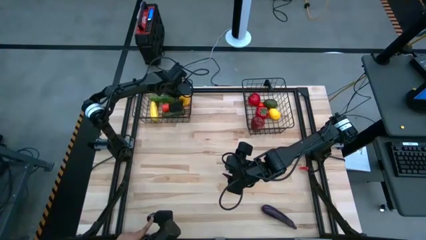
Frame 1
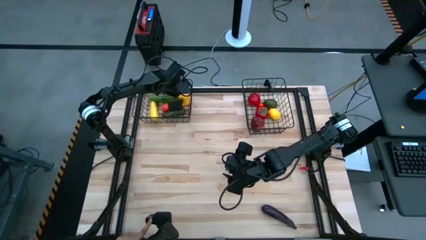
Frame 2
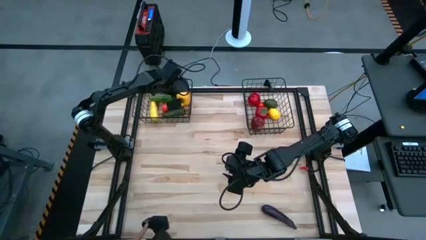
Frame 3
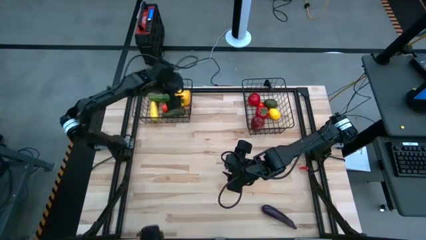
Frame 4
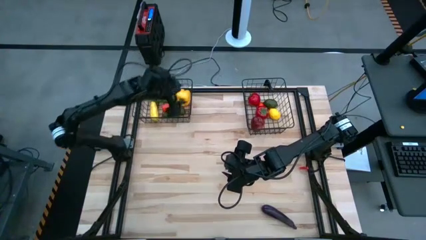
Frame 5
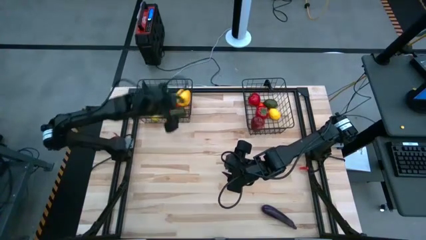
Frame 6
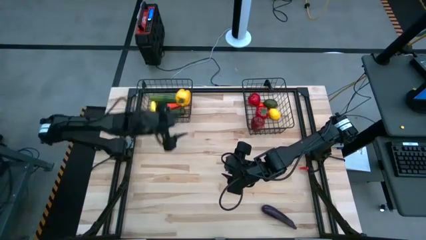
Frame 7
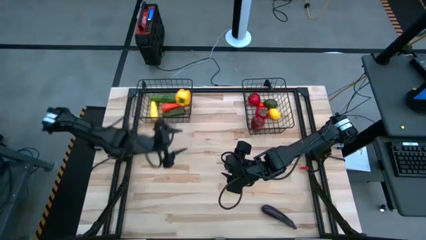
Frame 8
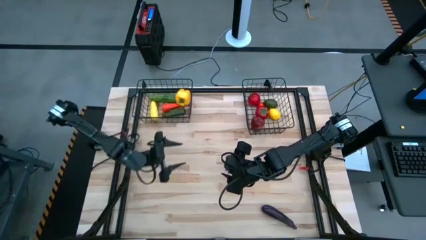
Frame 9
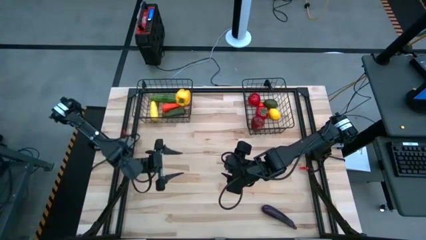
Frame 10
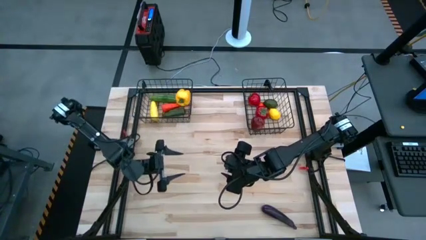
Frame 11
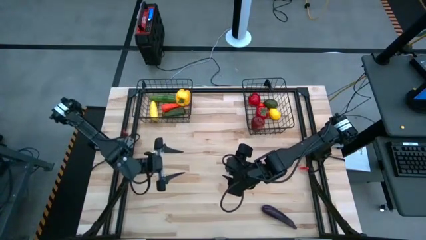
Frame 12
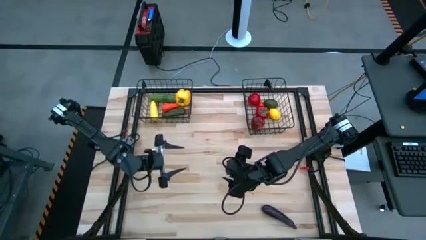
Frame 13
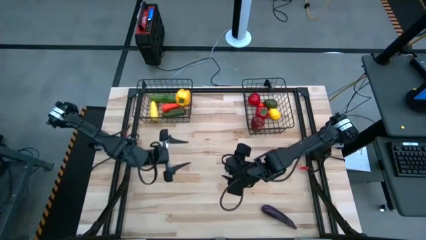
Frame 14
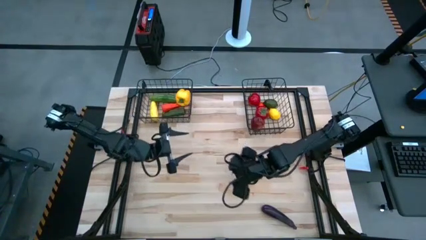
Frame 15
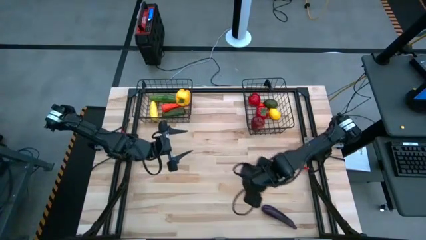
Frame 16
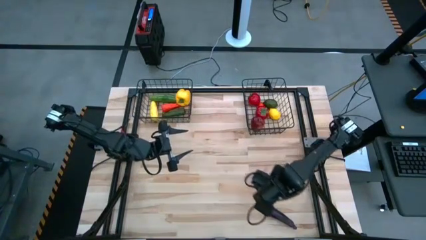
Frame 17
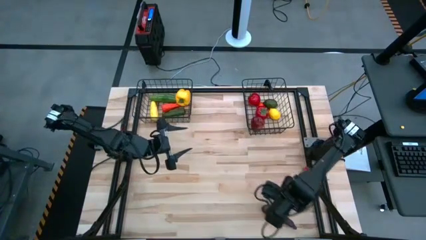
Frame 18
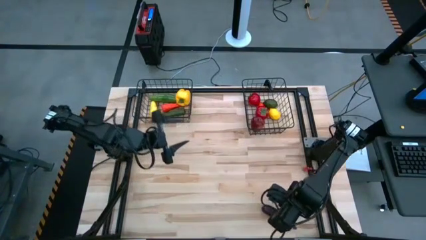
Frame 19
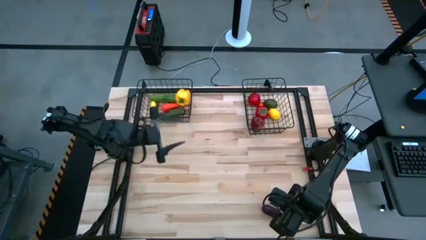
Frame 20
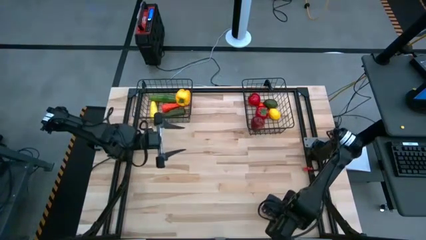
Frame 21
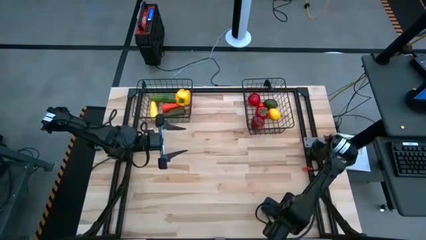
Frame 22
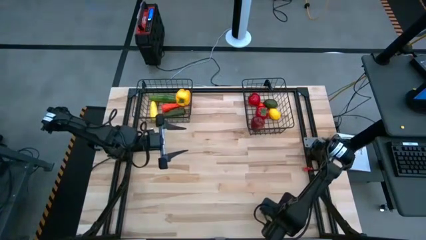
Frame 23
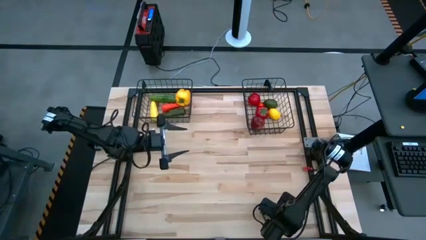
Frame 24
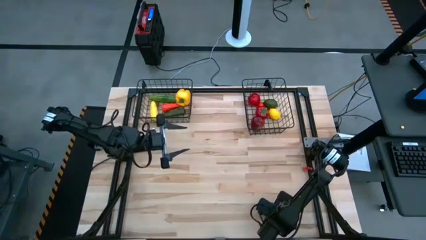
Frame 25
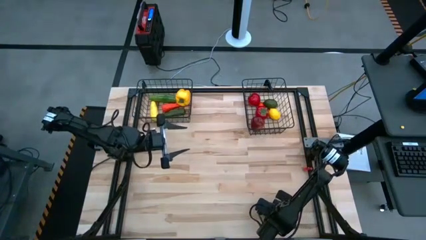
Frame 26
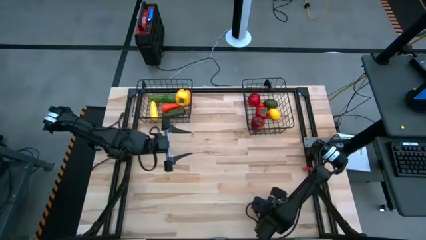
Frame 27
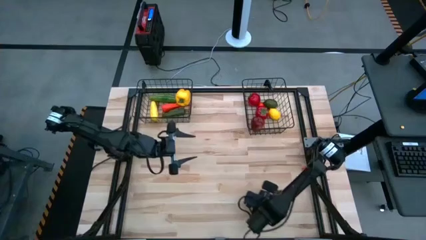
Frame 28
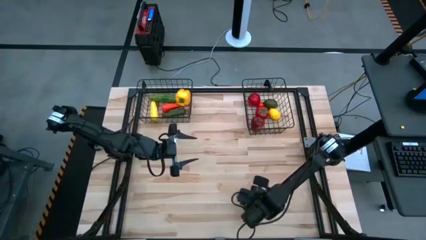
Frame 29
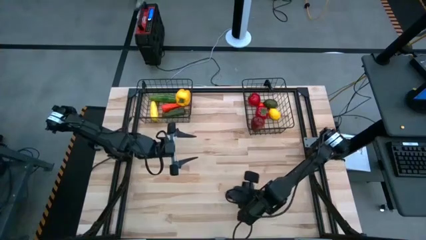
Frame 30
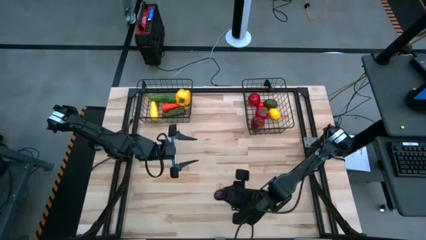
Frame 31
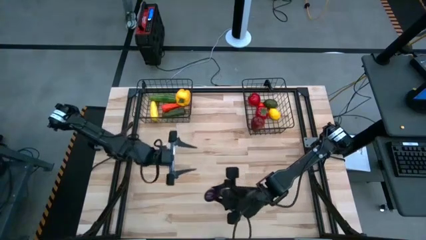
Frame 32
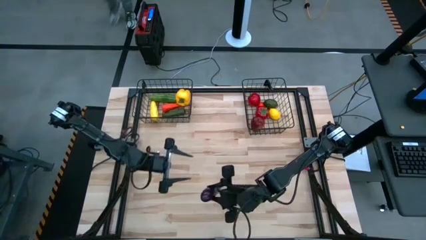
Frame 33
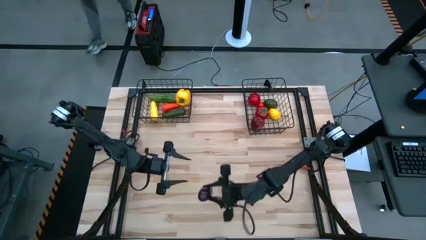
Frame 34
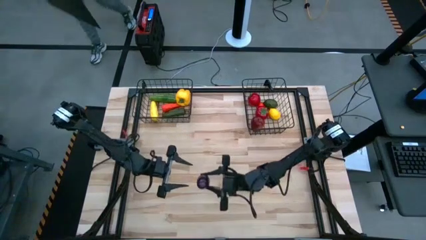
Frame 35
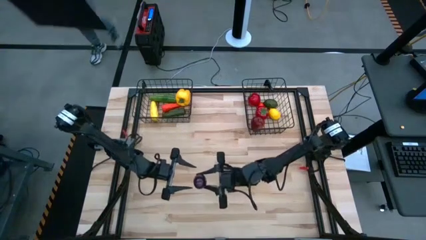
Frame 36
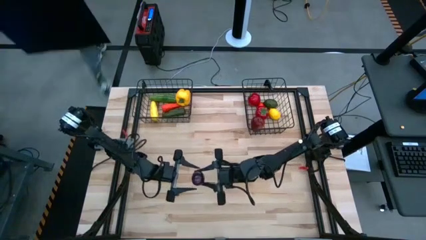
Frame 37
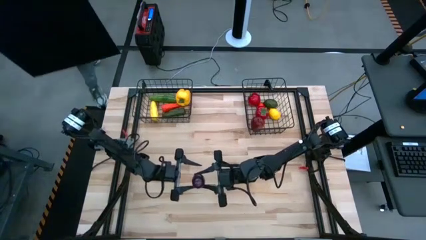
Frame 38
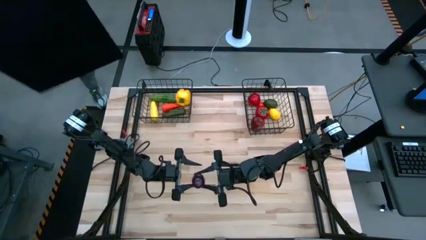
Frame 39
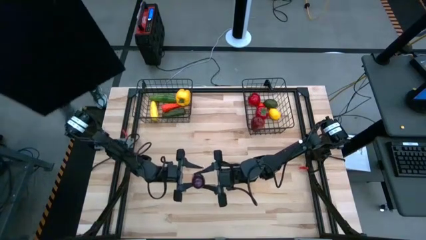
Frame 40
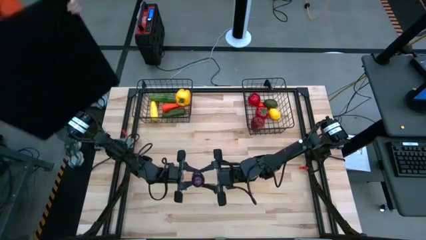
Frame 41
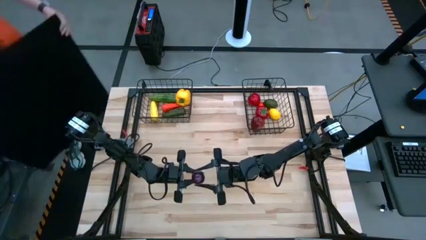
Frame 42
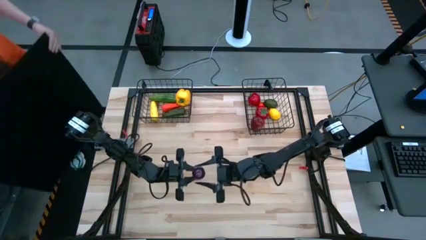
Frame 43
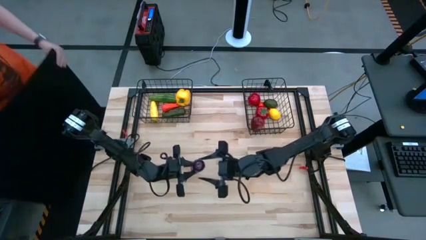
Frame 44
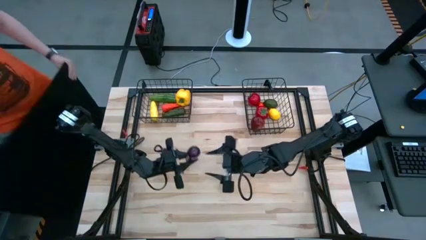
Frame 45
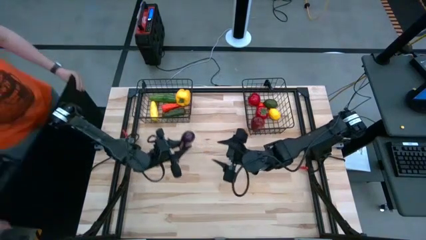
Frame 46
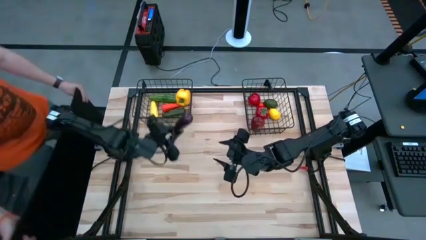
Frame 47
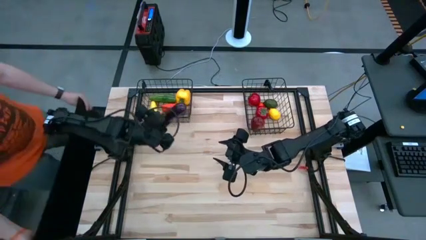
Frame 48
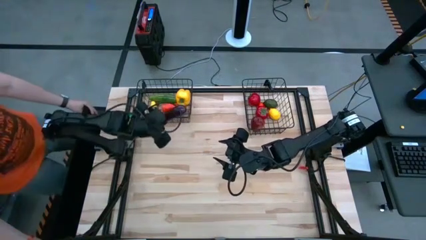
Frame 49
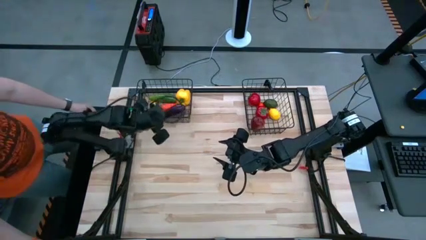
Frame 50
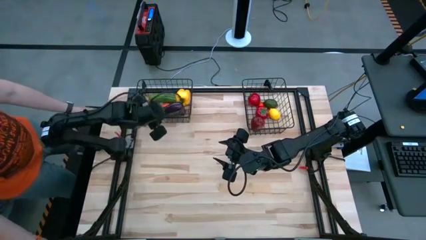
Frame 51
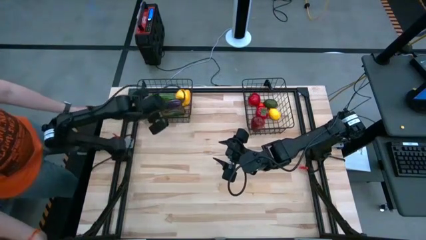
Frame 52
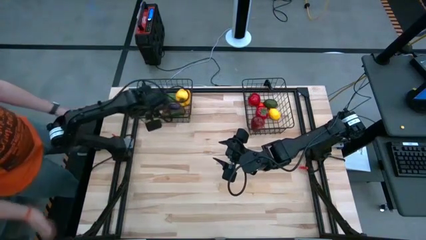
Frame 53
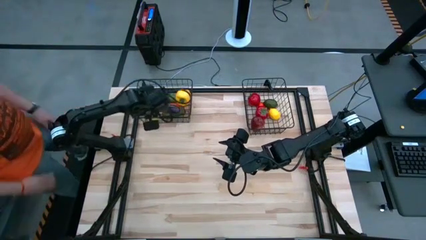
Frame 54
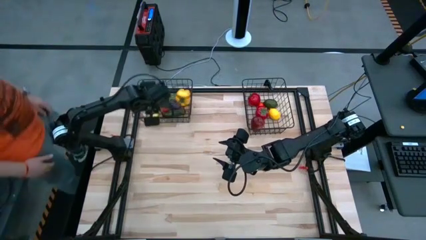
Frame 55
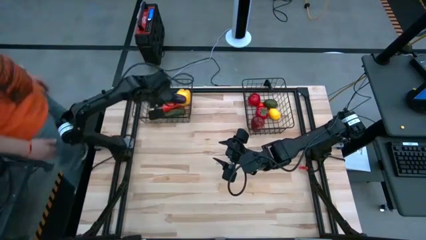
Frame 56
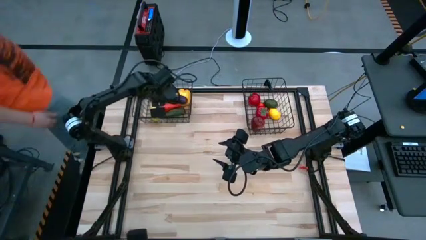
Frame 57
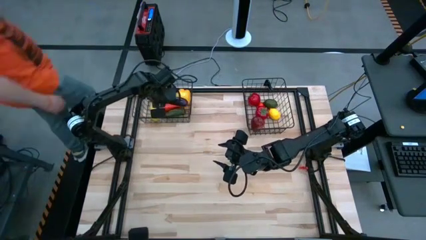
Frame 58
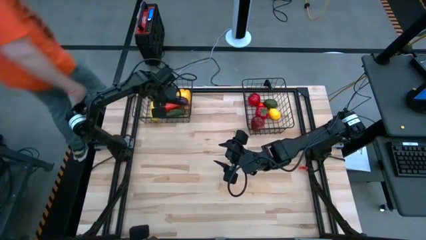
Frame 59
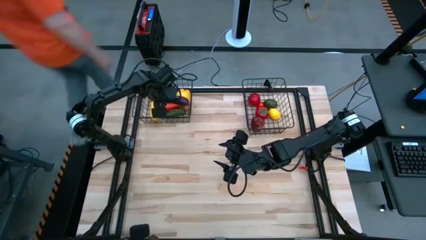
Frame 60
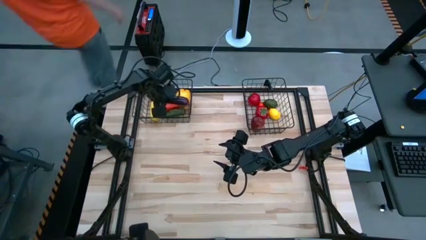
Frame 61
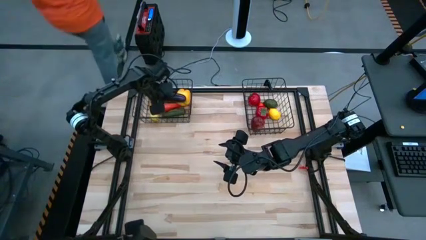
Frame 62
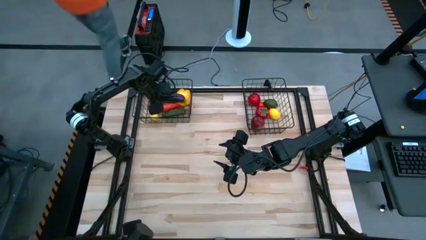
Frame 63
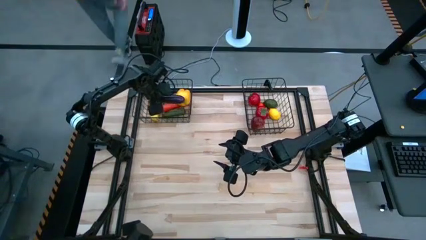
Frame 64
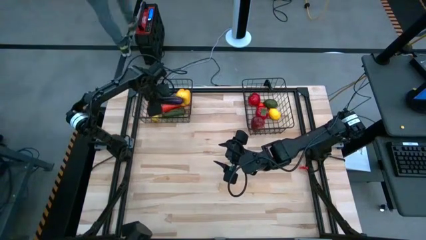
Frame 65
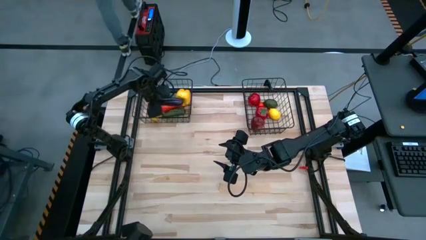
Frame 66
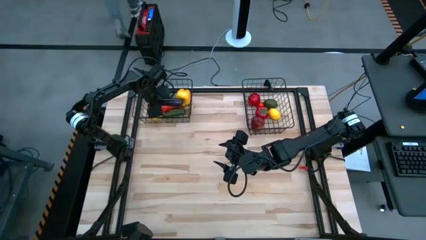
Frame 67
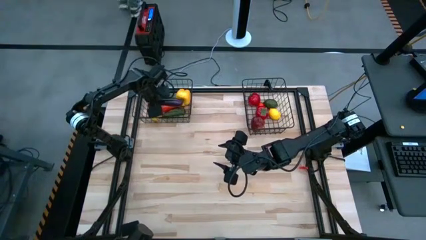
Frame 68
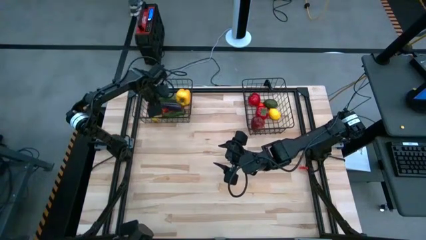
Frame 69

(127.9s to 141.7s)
Task: Sort produce into baskets
Put the purple eggplant into the left black wire basket
